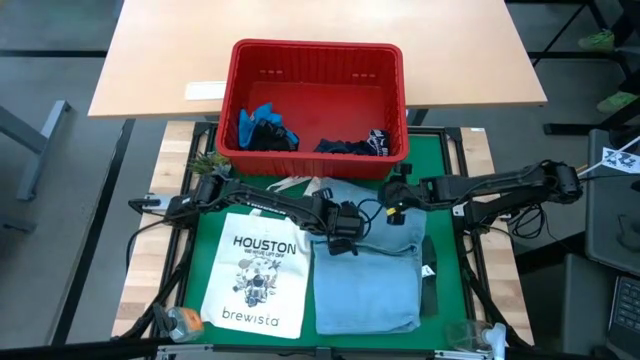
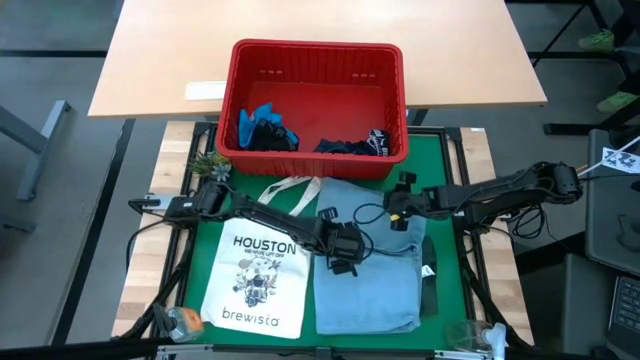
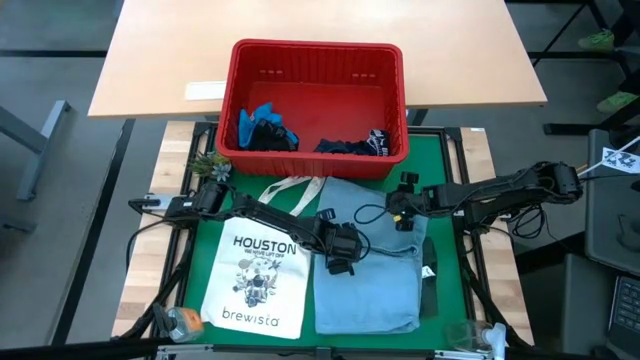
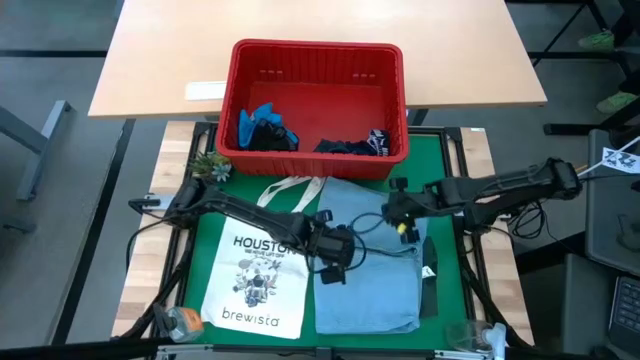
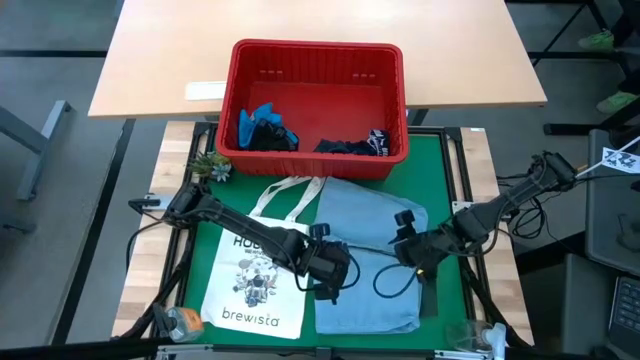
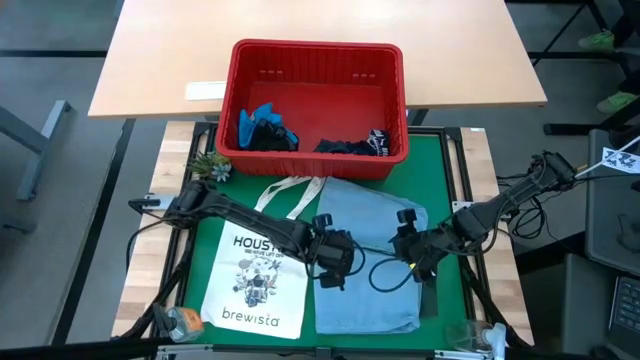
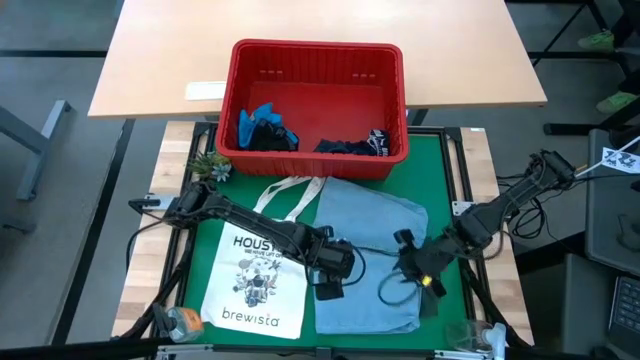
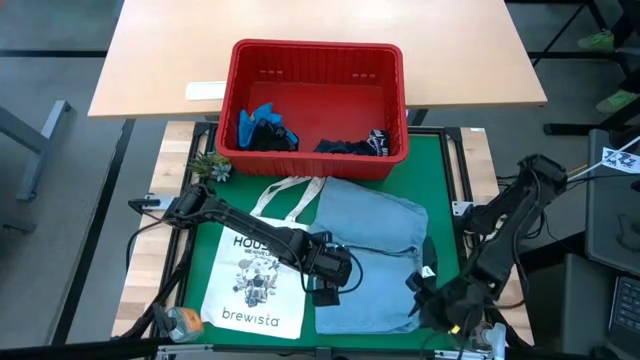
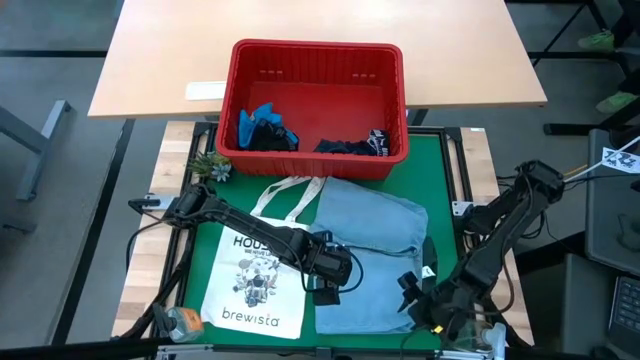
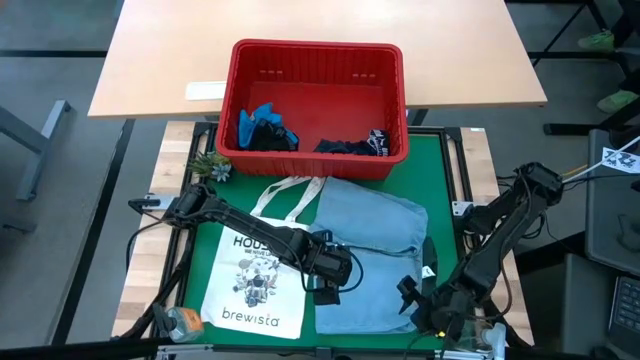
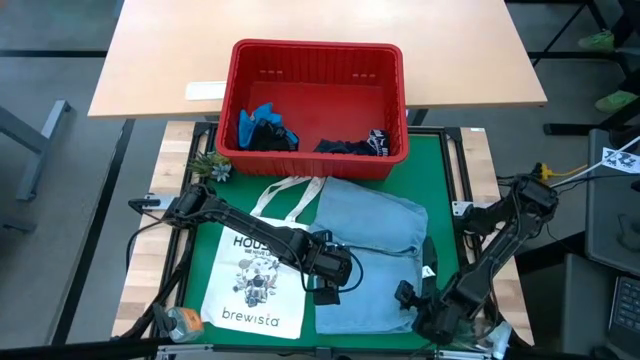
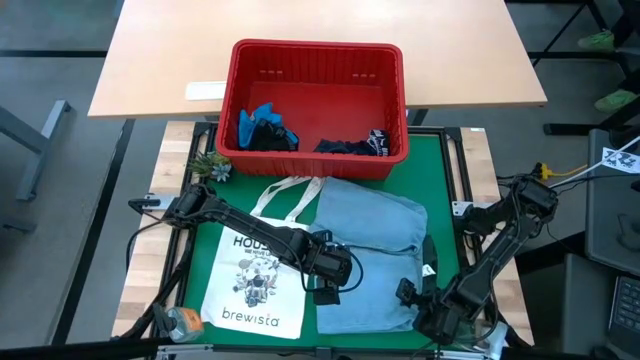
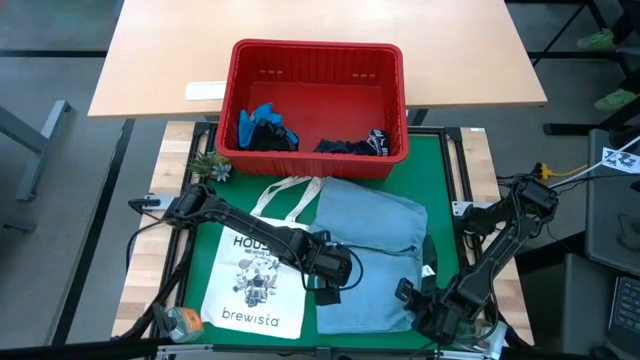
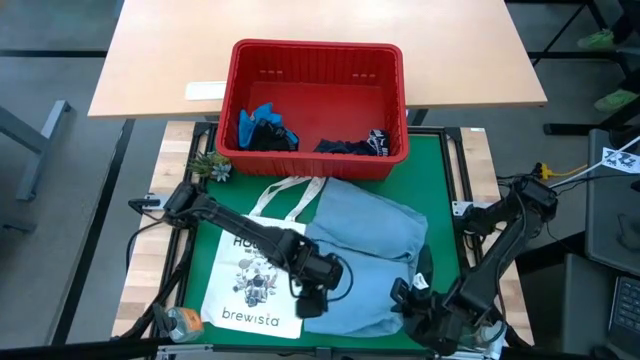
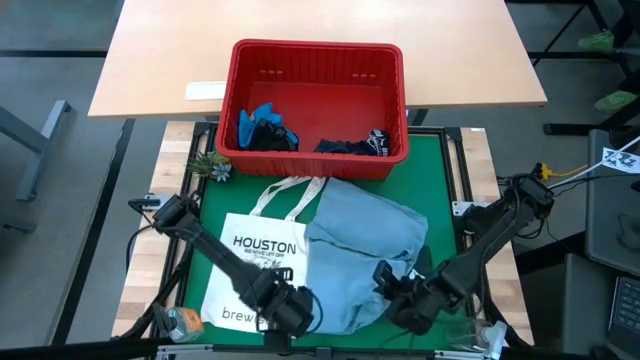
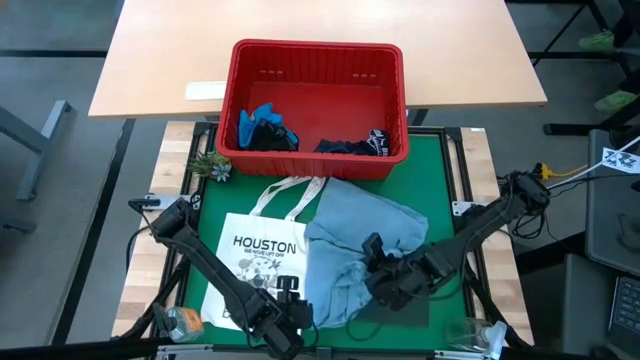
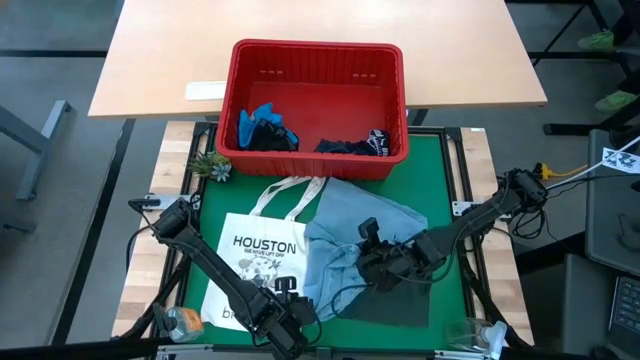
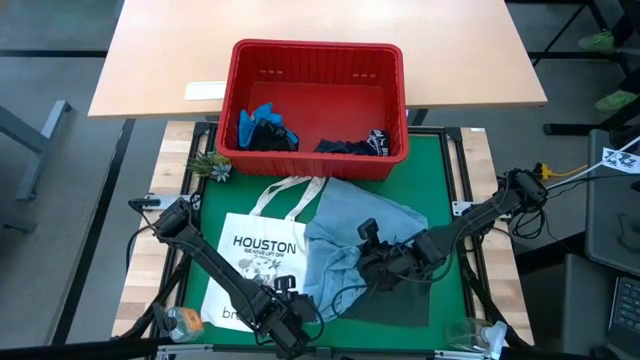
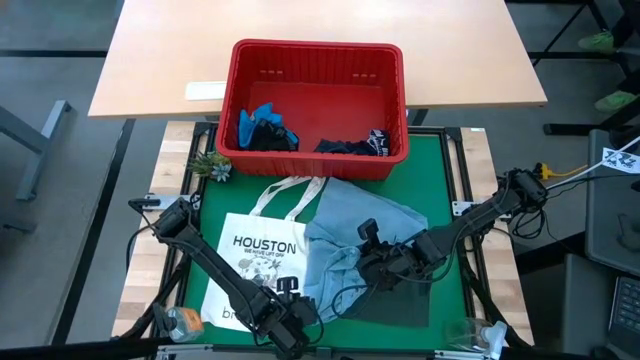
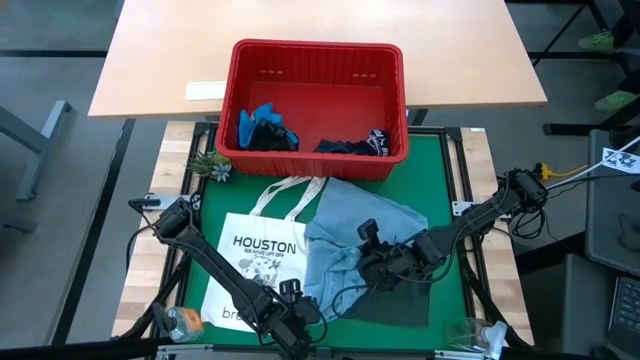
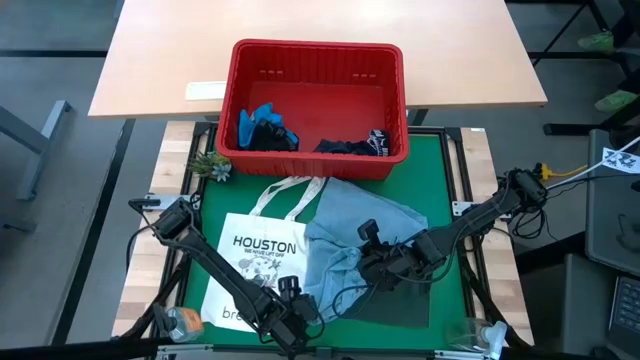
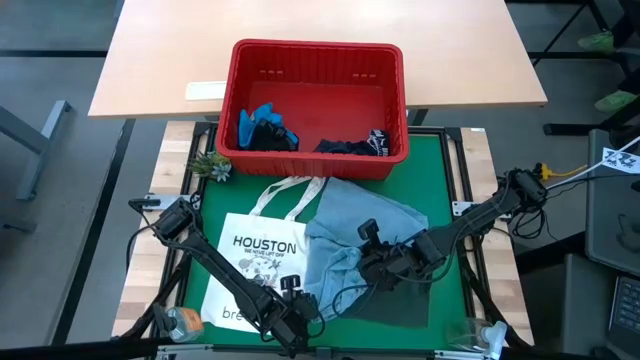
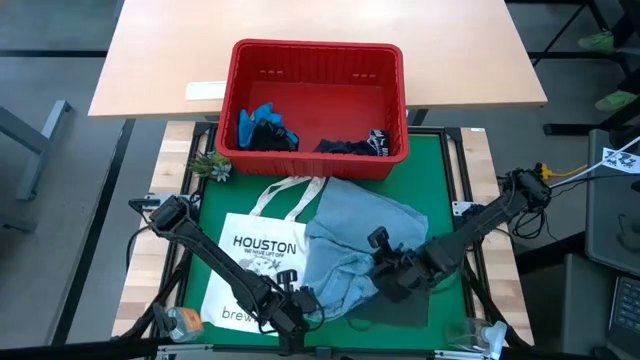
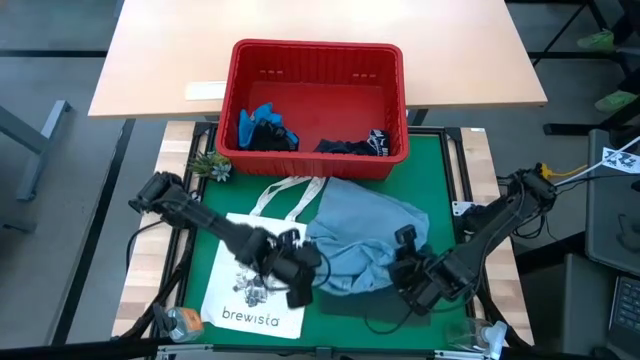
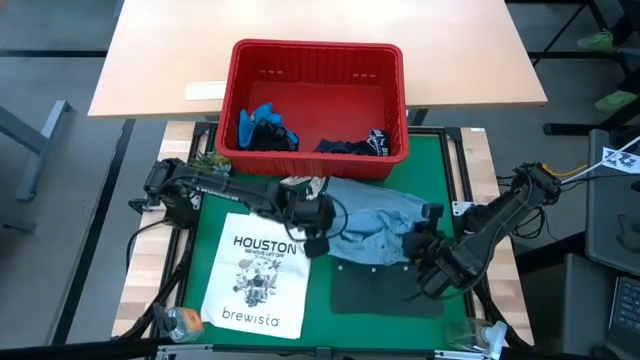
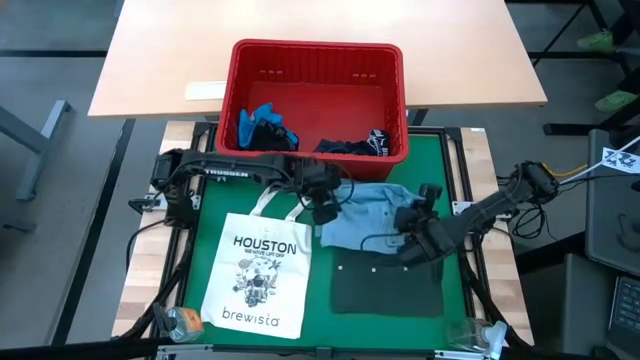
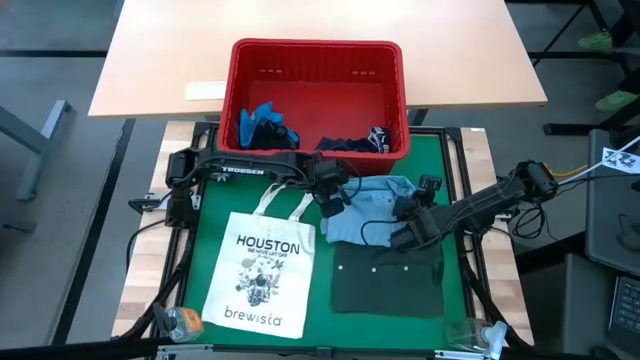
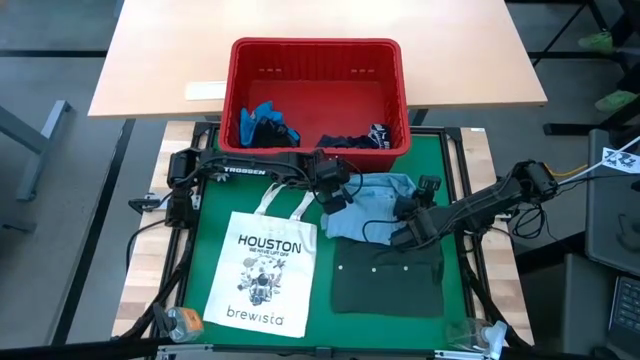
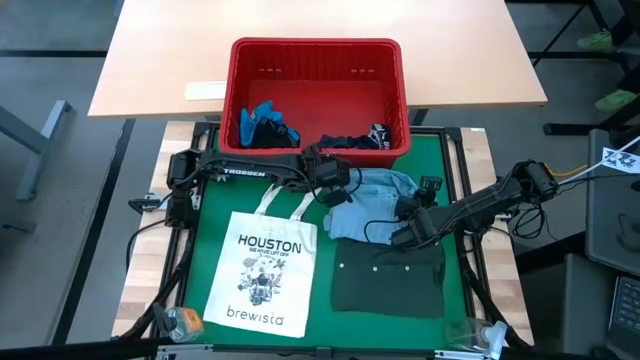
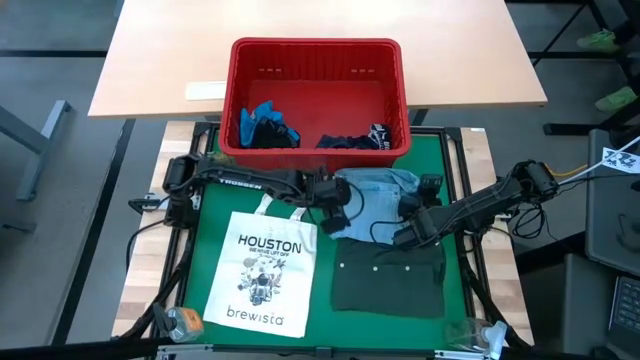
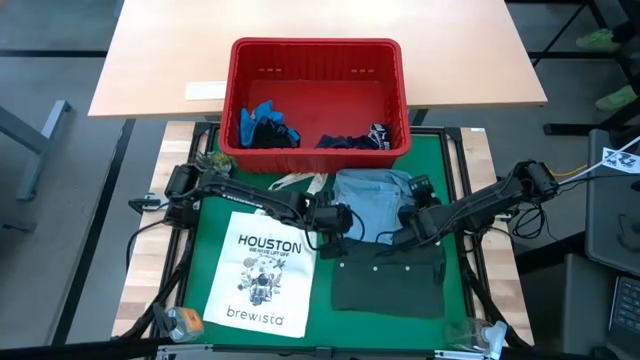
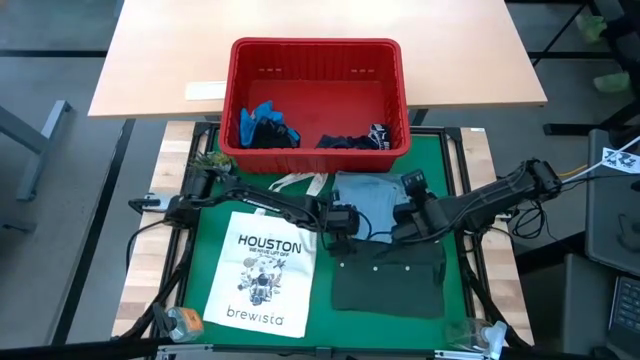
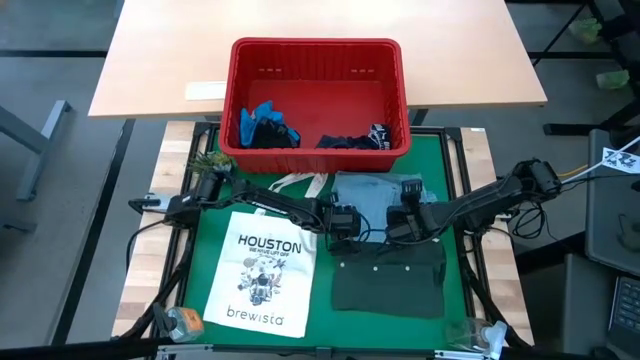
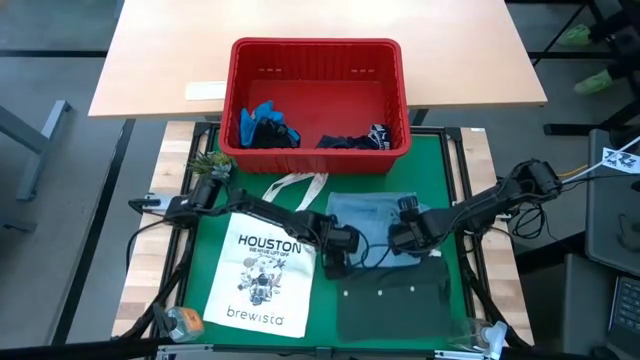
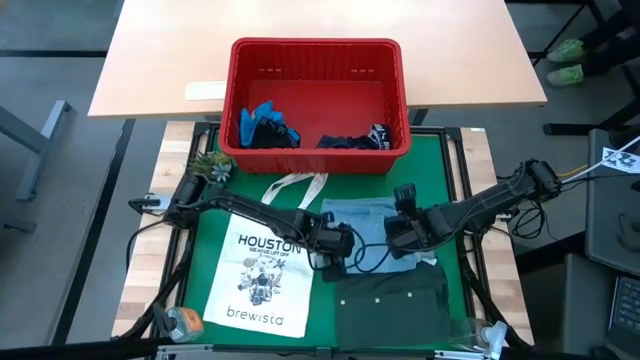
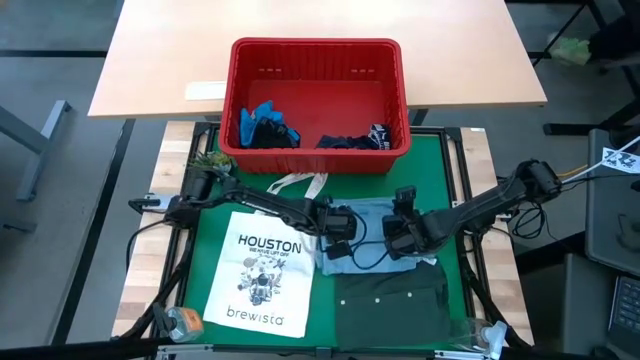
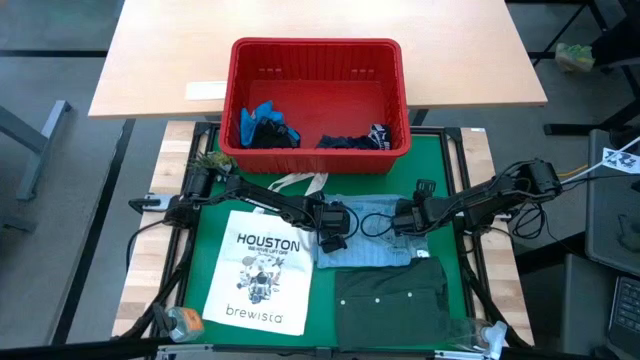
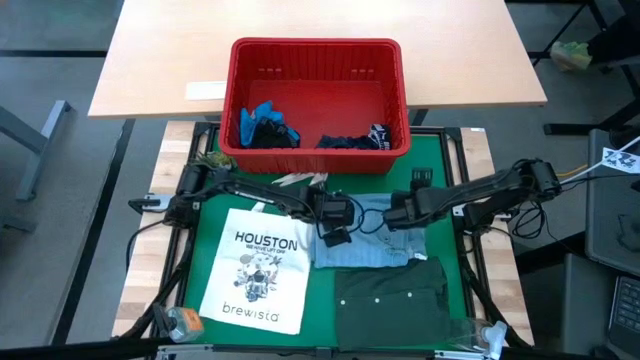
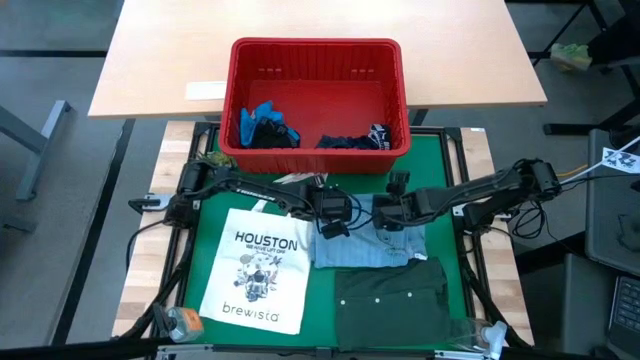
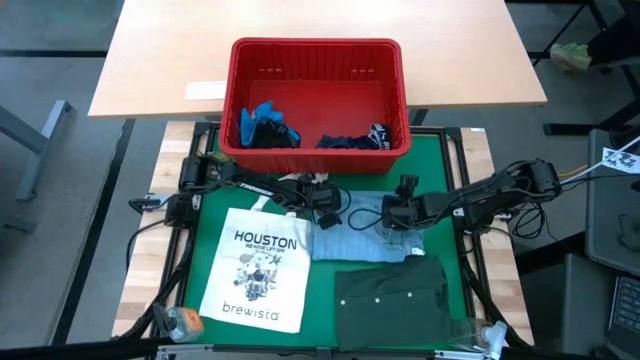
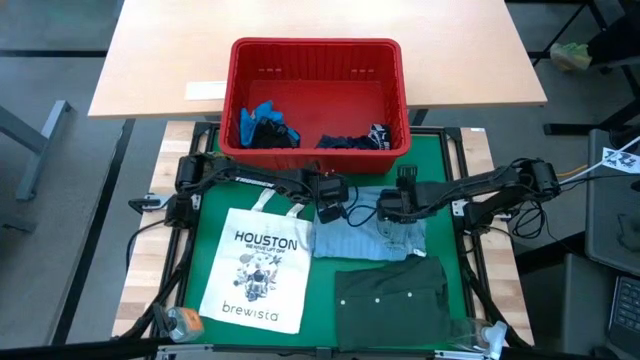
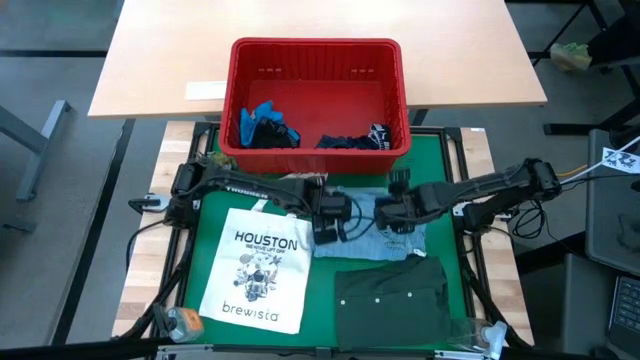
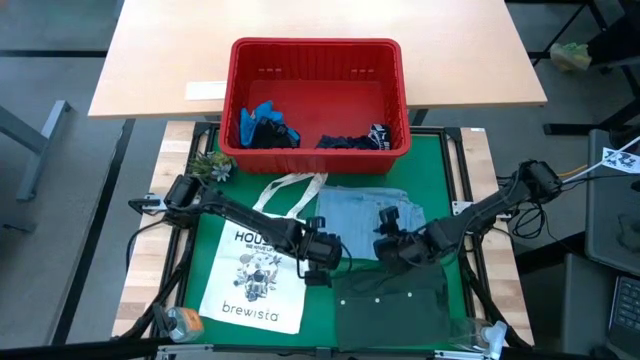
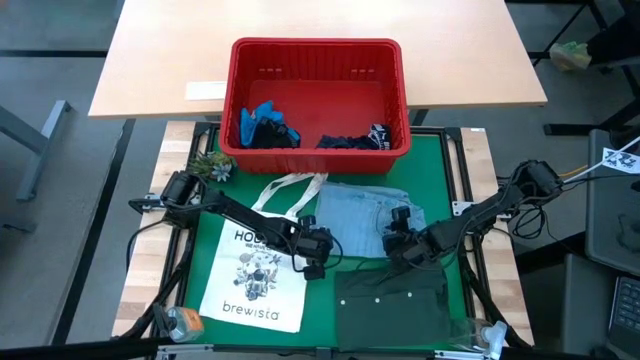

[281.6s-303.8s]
Task: Fold Laundry from Bin
Fold the light blue jeans
